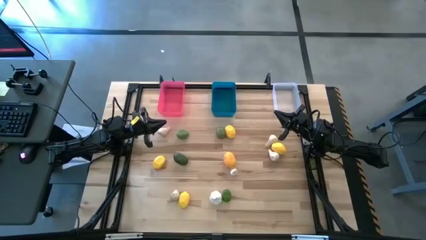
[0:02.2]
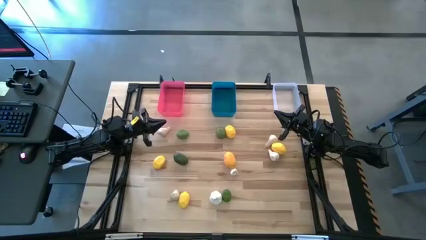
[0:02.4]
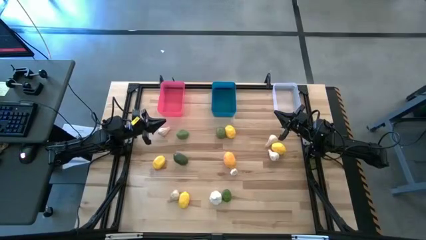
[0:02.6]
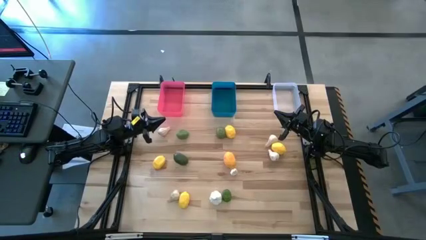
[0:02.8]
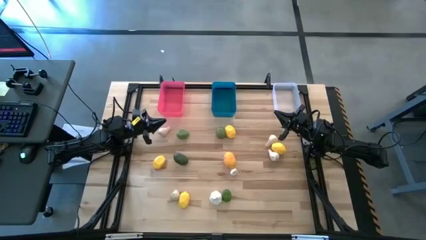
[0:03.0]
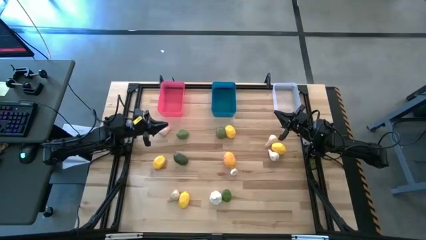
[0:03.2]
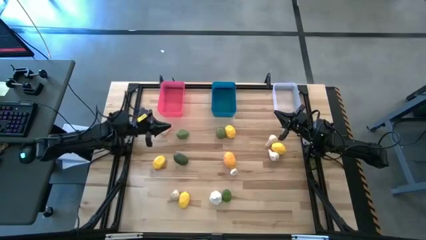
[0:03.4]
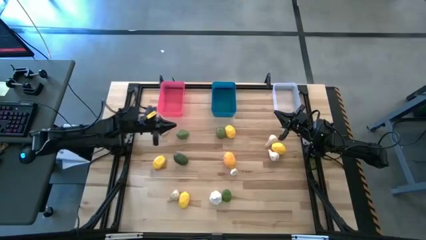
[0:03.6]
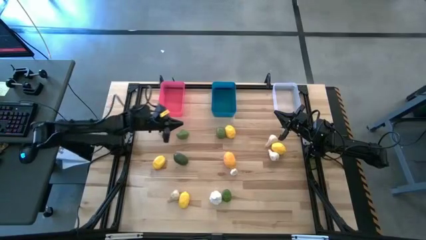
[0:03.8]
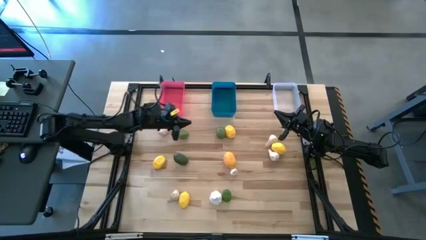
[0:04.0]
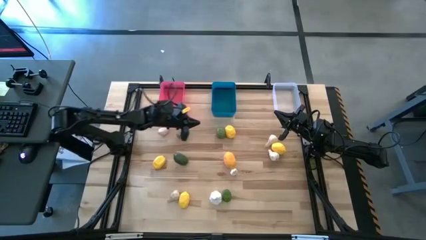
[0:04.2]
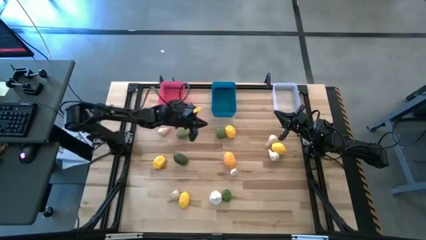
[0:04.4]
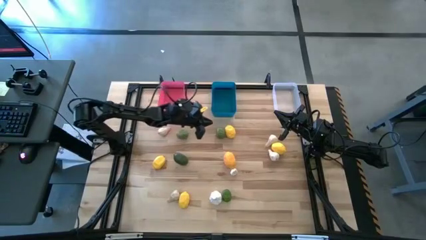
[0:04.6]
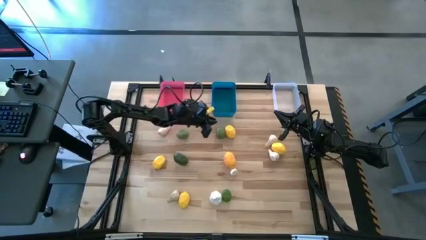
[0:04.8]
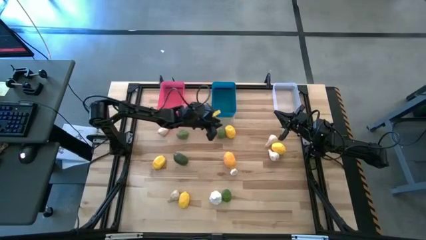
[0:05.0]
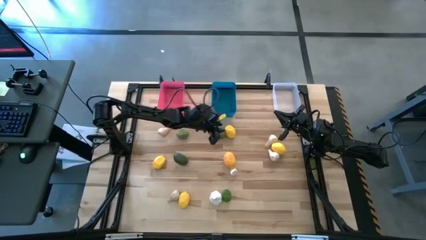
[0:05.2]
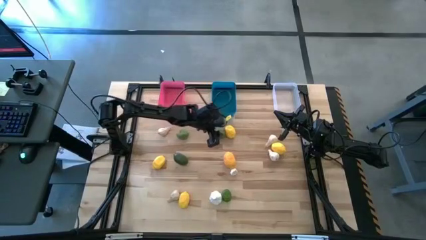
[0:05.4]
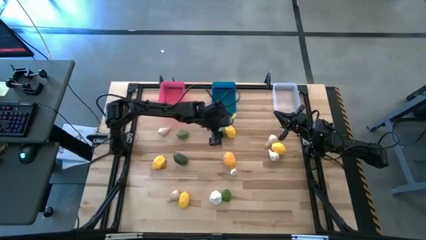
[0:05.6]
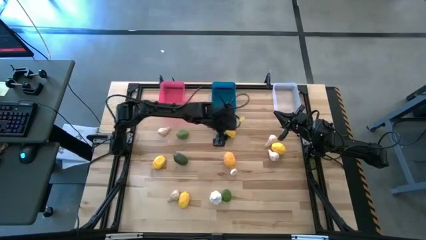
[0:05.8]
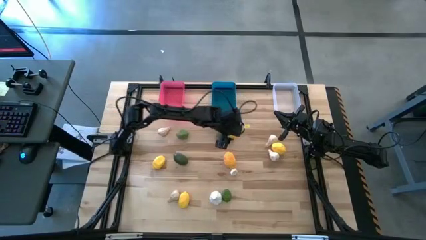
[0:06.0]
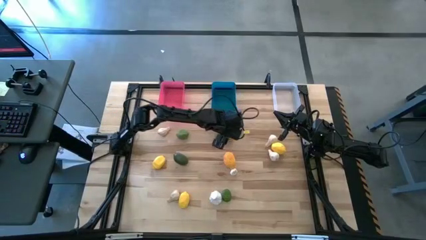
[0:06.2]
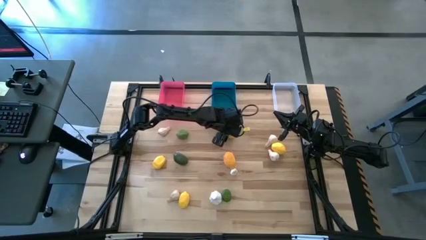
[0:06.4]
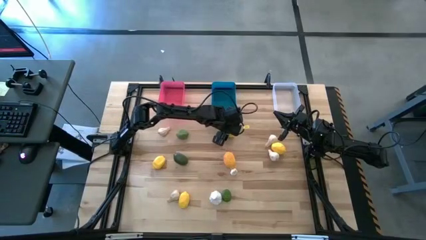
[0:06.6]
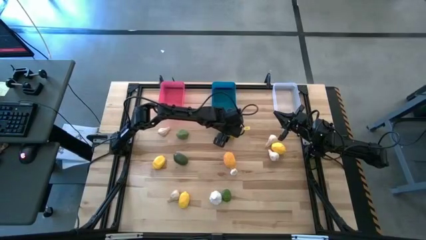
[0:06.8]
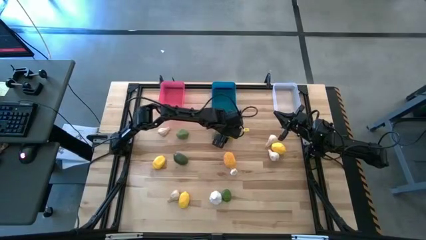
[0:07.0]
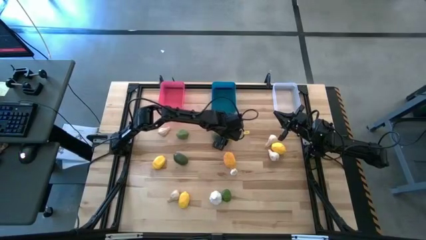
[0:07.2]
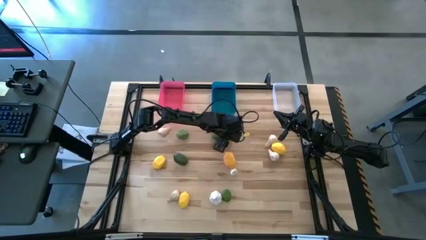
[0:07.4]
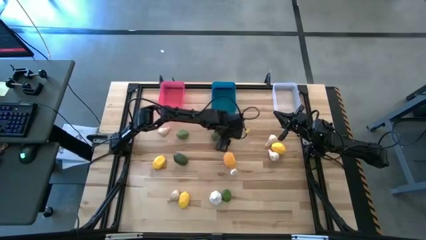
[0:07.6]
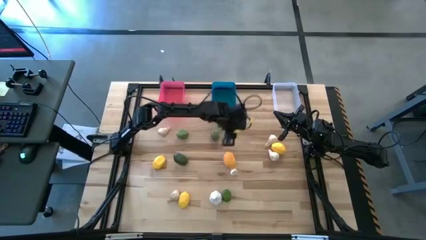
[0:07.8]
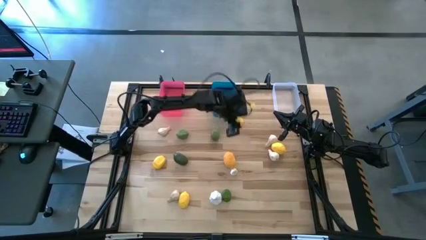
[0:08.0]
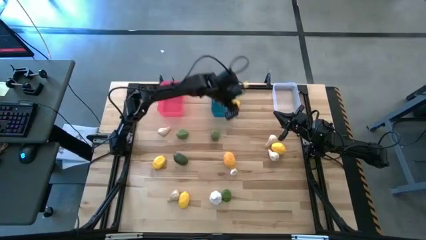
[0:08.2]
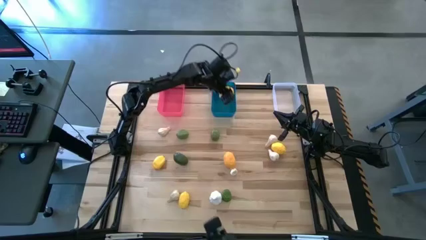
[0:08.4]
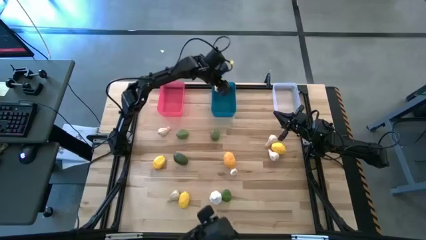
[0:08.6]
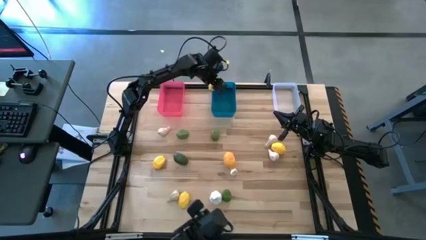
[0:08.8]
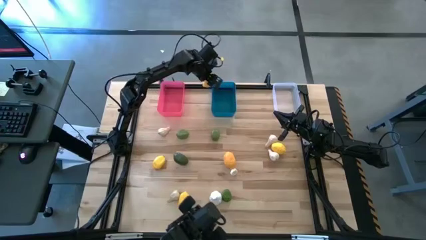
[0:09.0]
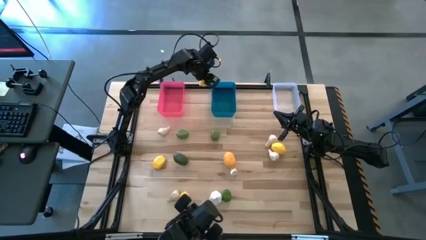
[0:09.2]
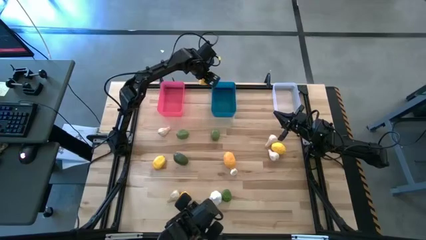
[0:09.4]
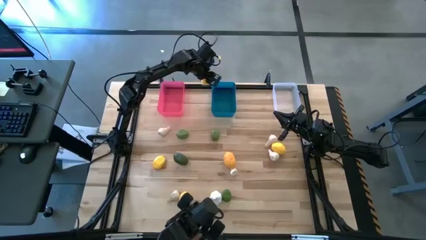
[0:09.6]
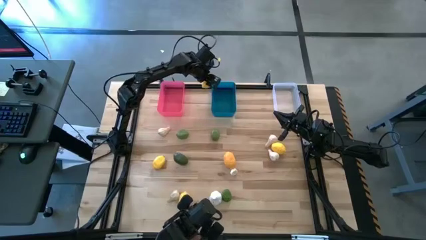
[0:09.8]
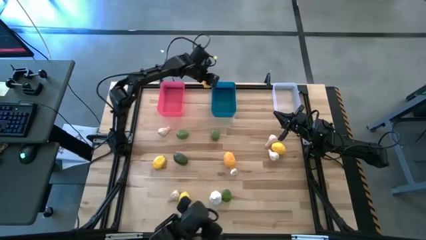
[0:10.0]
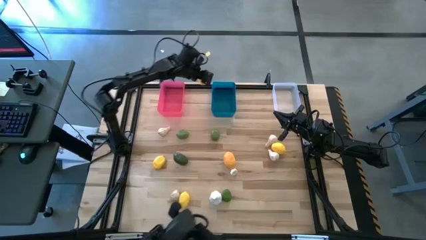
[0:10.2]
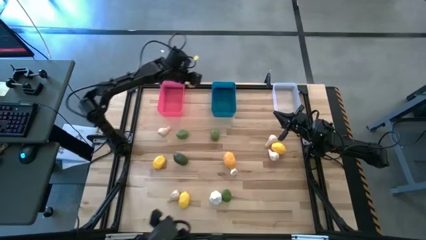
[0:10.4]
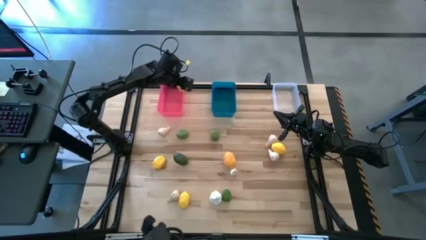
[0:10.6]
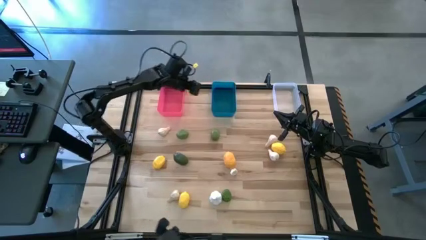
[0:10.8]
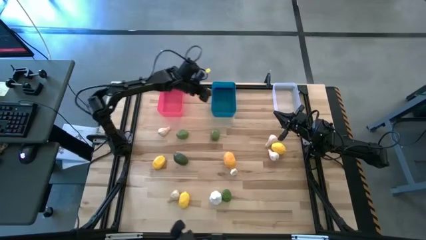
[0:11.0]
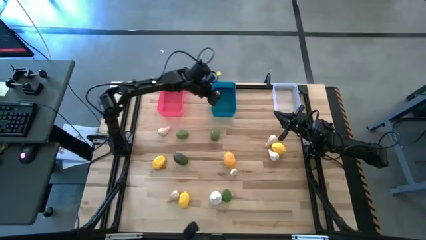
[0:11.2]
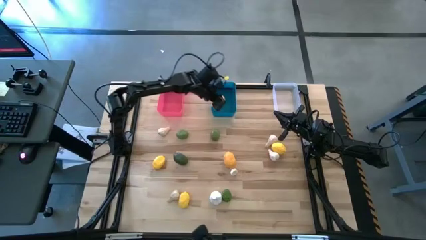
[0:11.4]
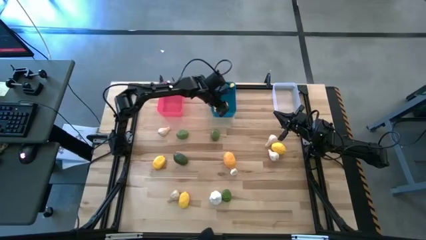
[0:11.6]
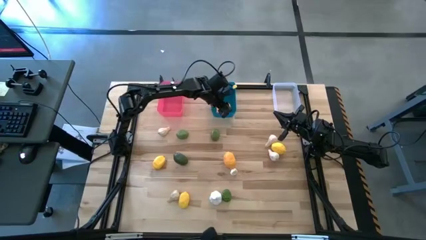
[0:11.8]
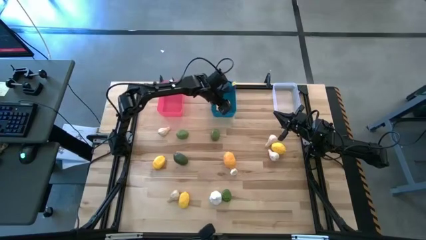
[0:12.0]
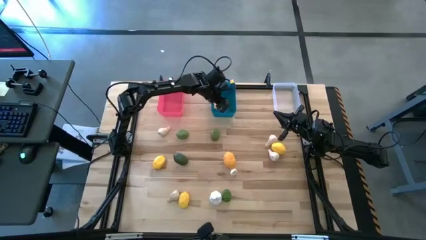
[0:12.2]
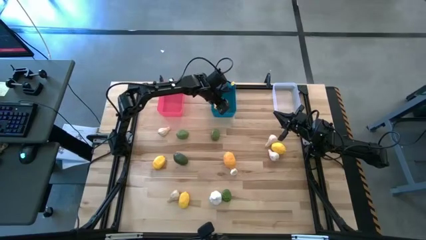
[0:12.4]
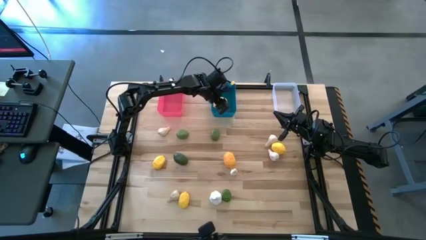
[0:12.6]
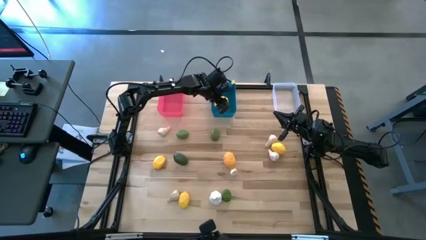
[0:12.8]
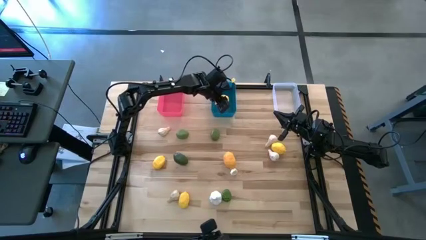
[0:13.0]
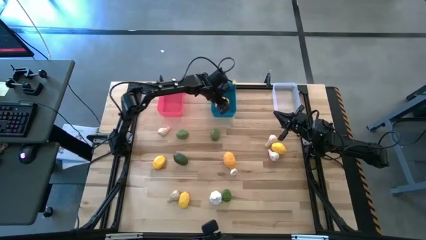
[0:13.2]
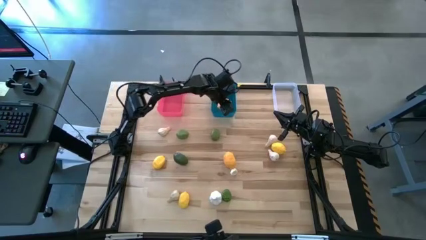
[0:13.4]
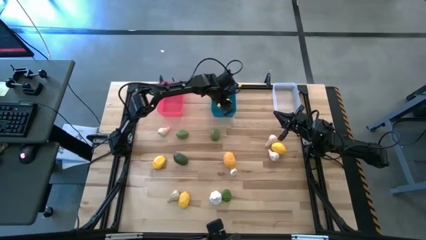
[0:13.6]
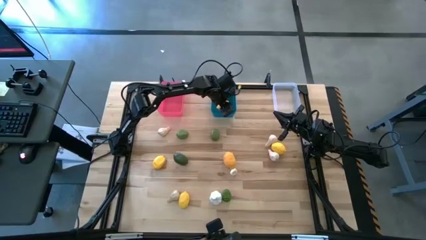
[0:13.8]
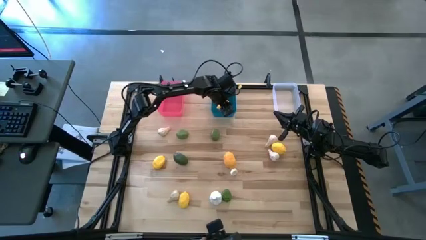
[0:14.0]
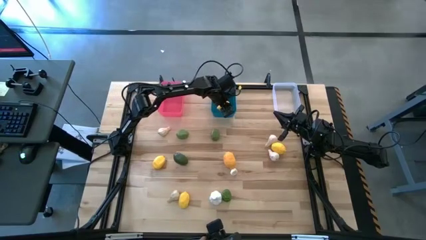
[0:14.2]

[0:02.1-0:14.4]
Task: Sort produce into baskets
Put the lemon into the blue bin

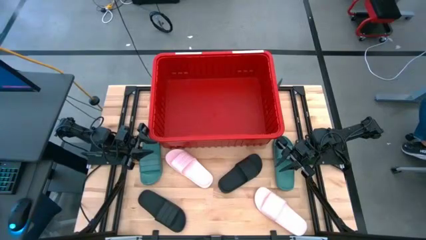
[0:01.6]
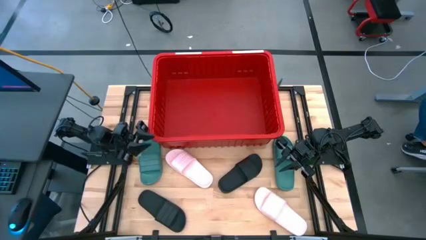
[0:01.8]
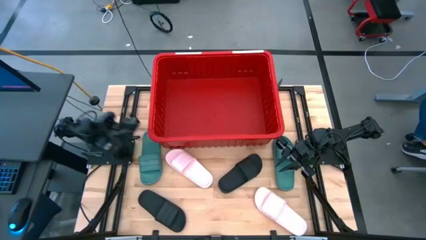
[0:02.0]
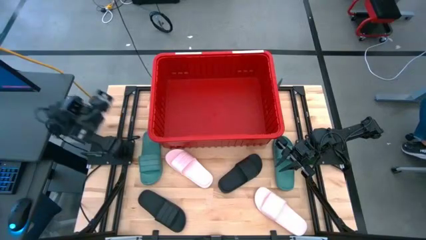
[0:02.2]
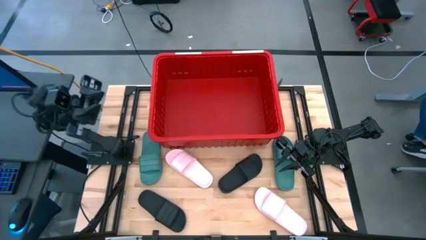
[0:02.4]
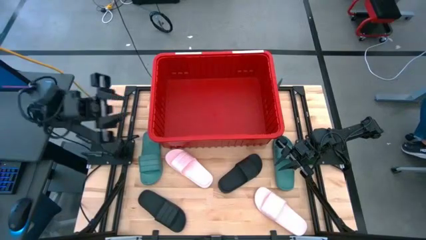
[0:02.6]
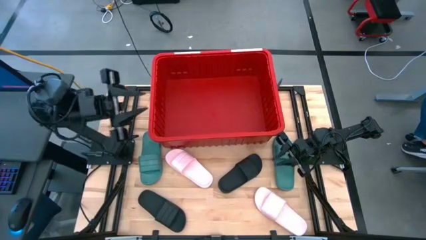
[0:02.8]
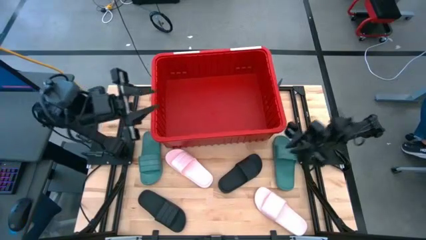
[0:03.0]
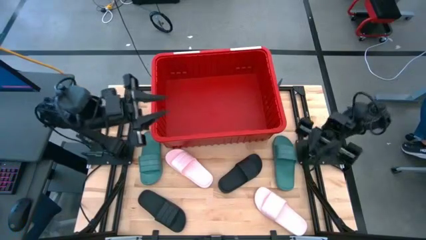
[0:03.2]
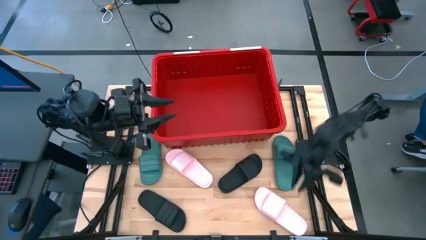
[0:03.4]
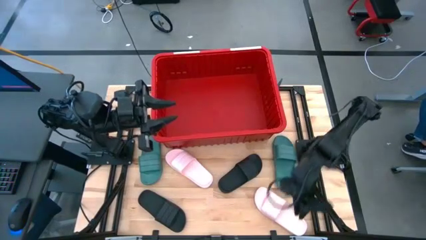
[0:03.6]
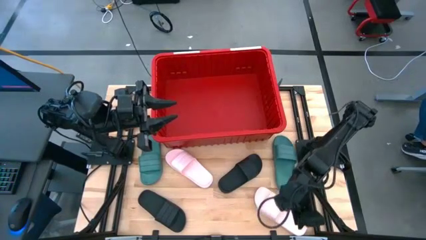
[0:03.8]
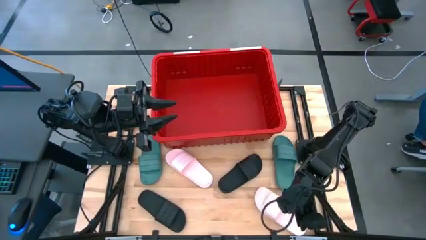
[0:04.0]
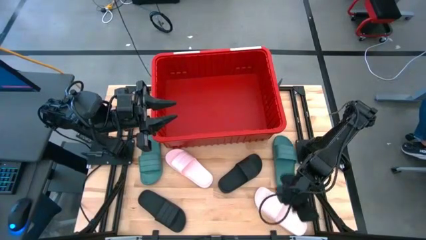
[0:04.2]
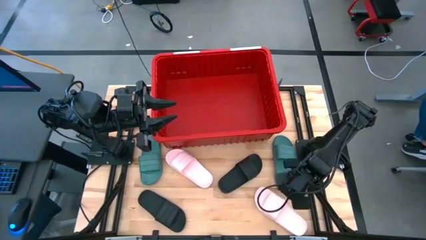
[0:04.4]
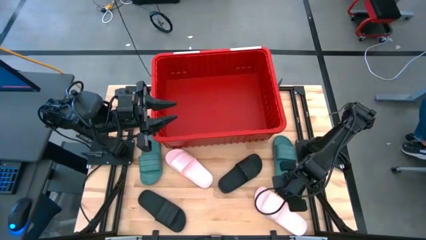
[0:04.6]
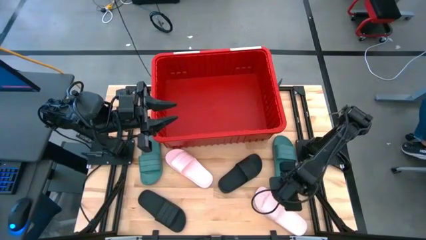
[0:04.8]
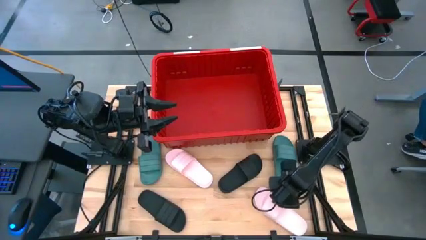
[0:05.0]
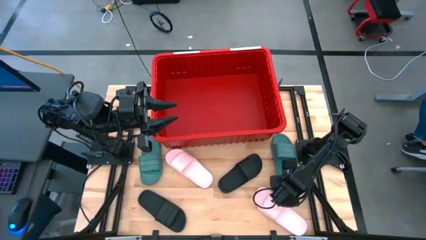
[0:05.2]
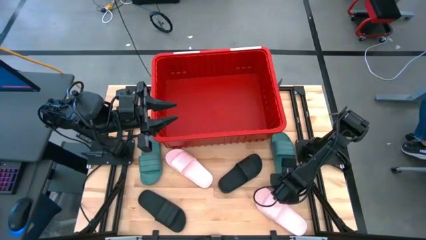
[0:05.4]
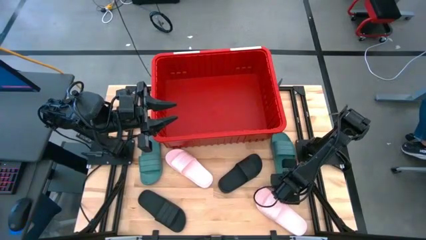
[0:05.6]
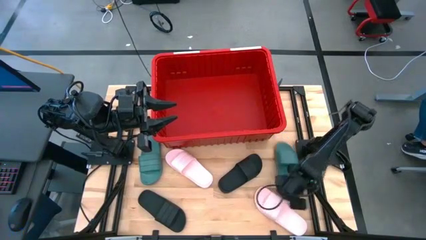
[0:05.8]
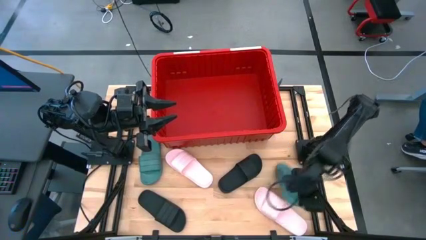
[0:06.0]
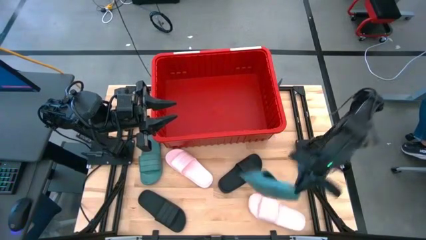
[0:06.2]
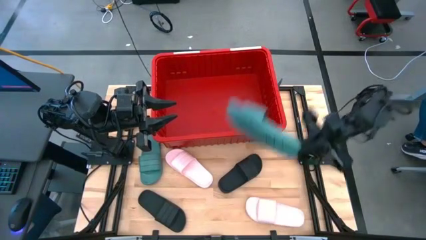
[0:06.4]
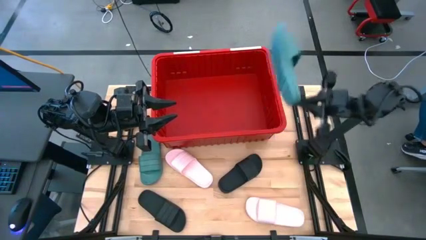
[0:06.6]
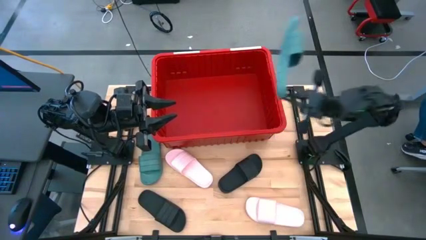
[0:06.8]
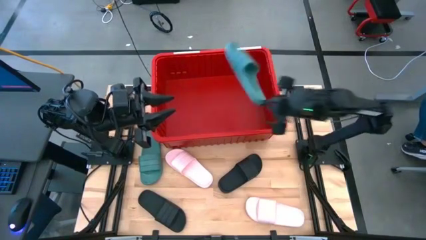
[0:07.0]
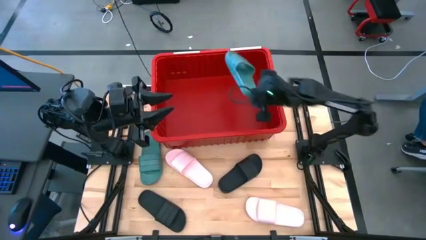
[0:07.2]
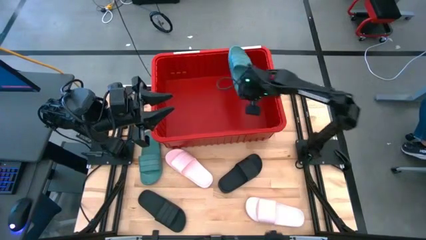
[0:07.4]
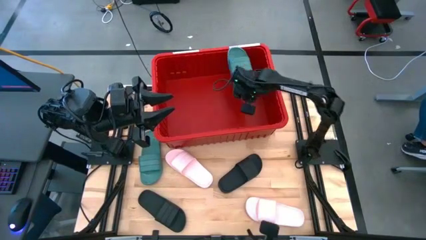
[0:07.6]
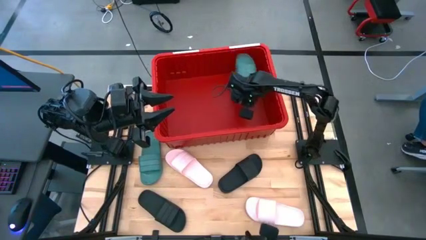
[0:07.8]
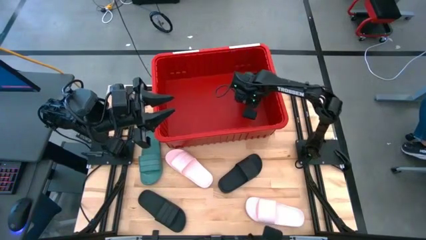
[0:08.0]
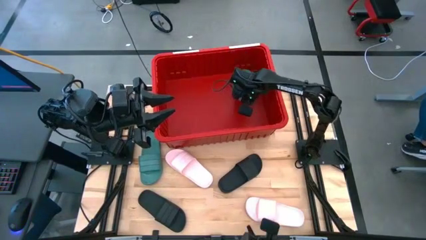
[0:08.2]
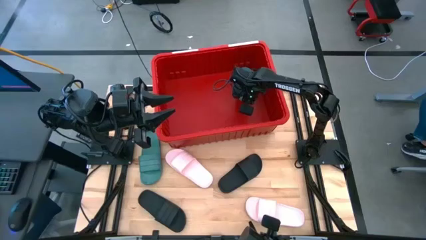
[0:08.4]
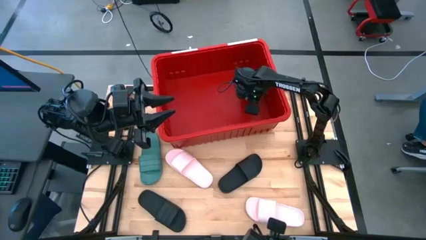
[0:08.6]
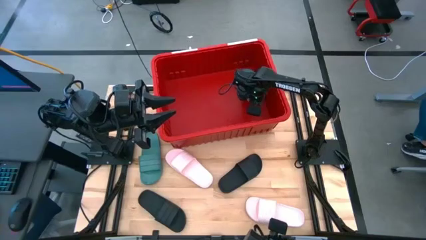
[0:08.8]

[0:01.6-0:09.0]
Task: Pick and place slides into bin
Put the right green slide into the red bin
